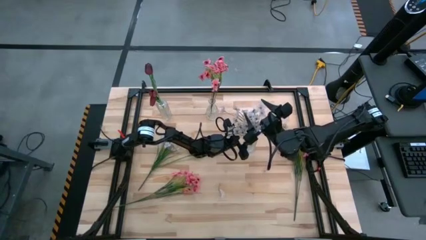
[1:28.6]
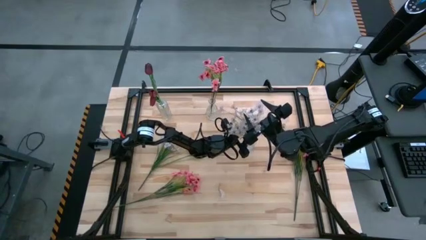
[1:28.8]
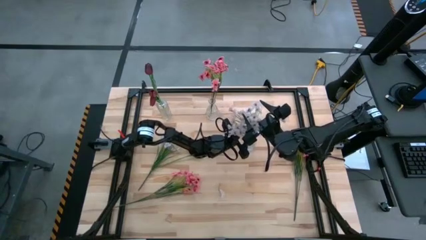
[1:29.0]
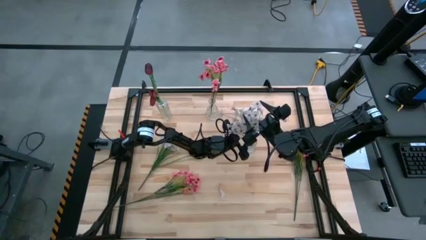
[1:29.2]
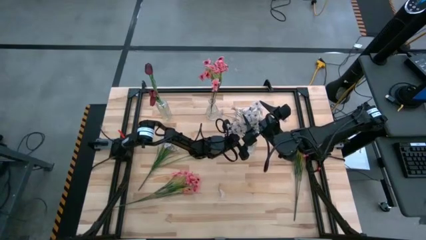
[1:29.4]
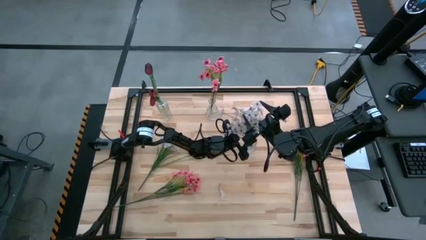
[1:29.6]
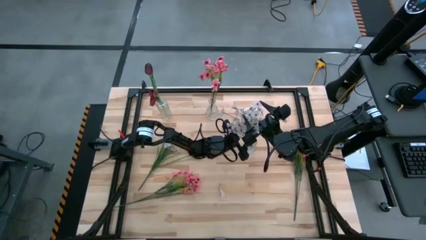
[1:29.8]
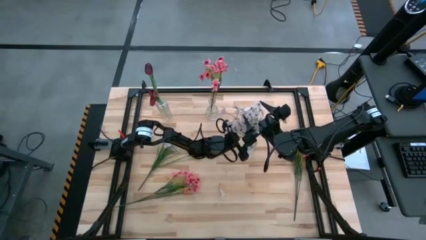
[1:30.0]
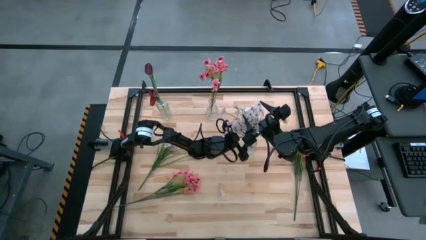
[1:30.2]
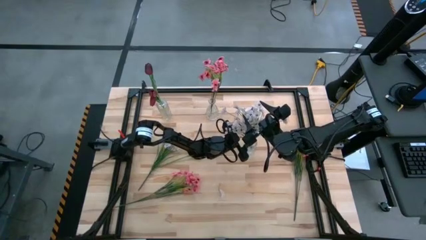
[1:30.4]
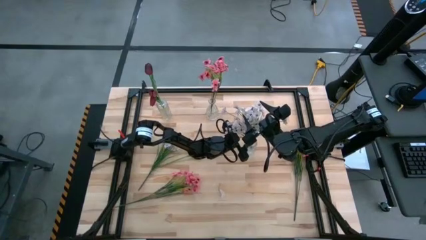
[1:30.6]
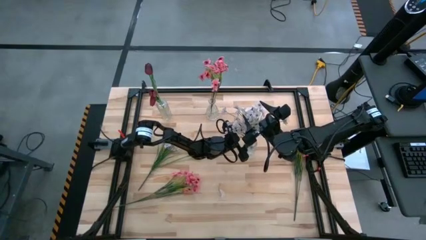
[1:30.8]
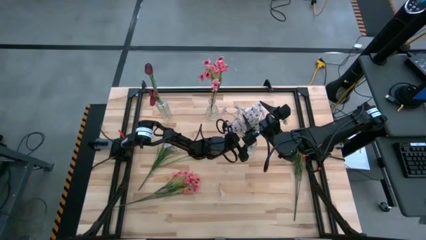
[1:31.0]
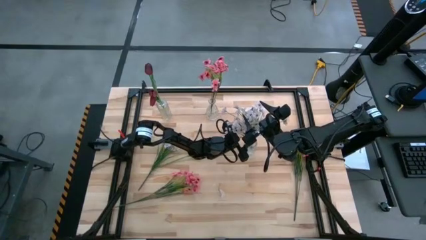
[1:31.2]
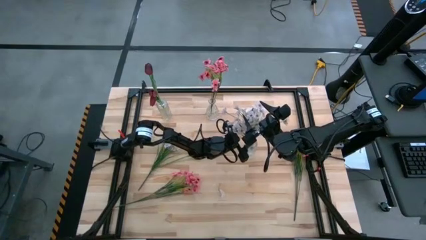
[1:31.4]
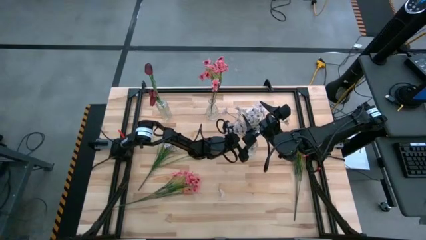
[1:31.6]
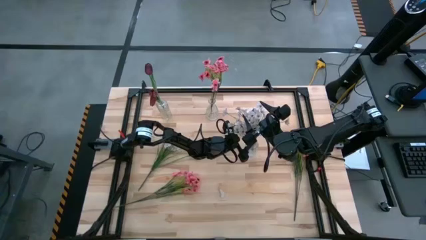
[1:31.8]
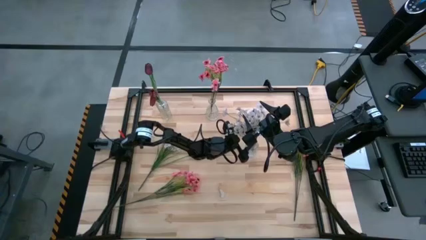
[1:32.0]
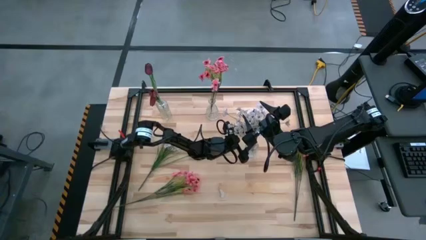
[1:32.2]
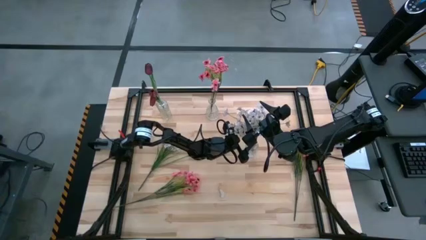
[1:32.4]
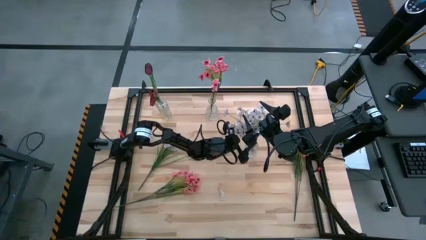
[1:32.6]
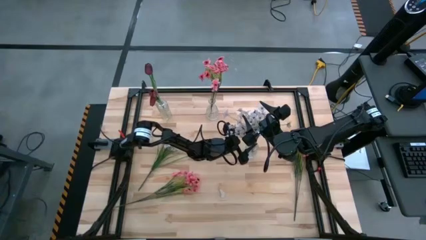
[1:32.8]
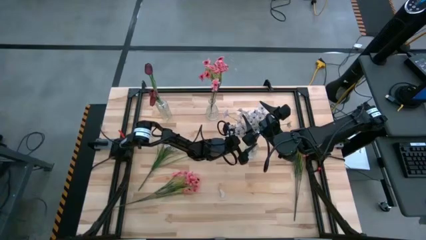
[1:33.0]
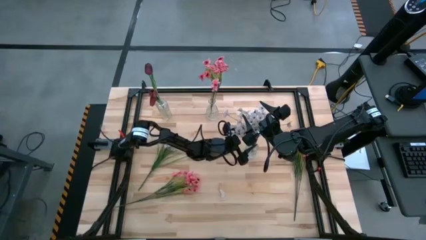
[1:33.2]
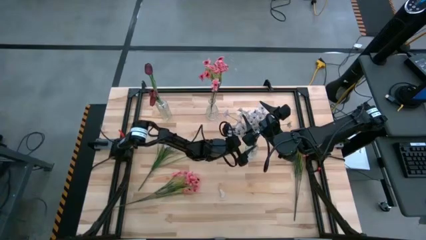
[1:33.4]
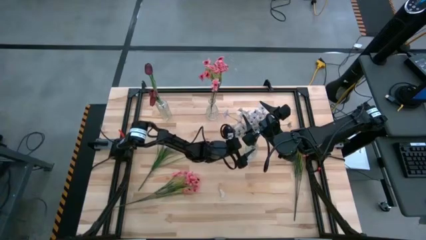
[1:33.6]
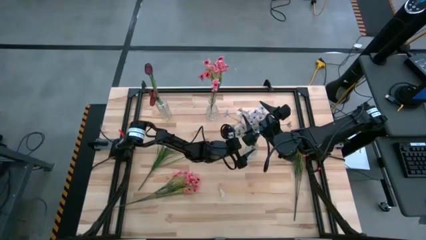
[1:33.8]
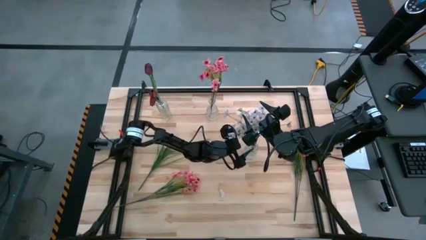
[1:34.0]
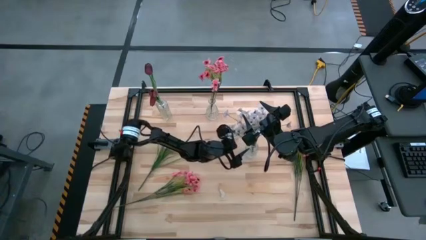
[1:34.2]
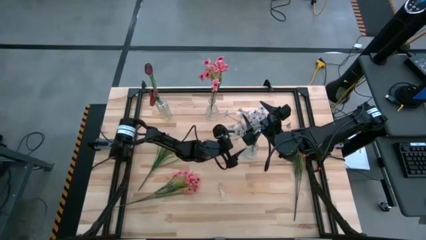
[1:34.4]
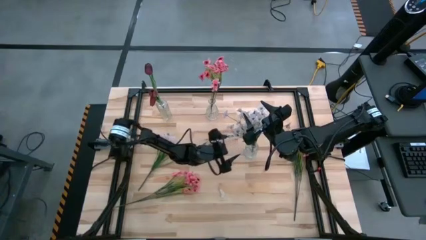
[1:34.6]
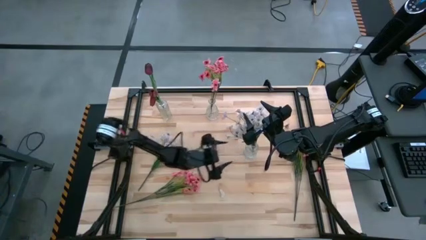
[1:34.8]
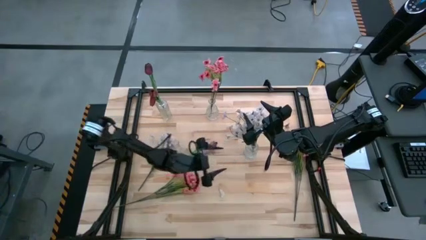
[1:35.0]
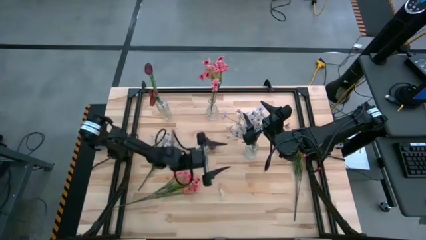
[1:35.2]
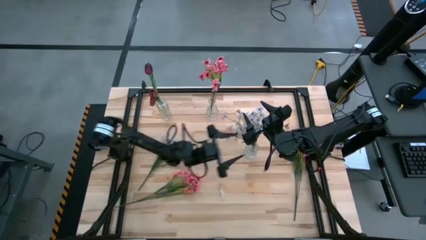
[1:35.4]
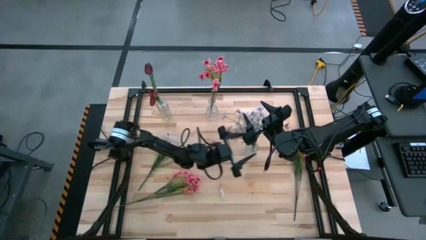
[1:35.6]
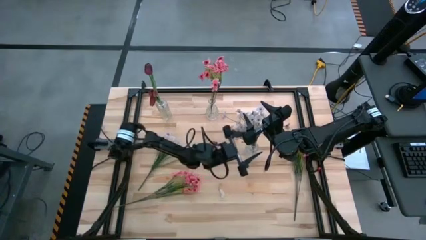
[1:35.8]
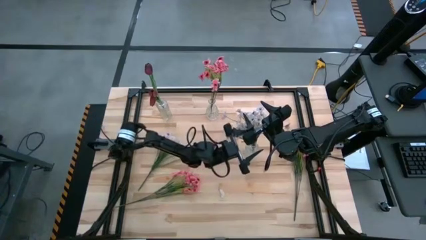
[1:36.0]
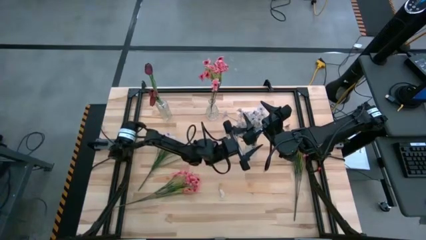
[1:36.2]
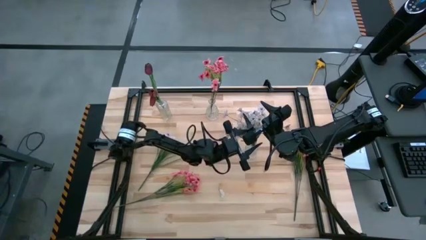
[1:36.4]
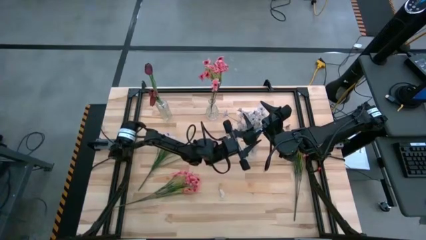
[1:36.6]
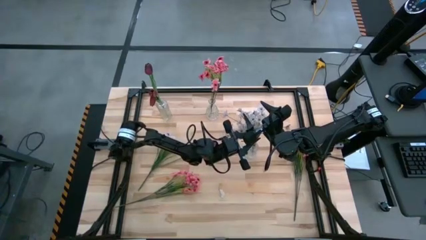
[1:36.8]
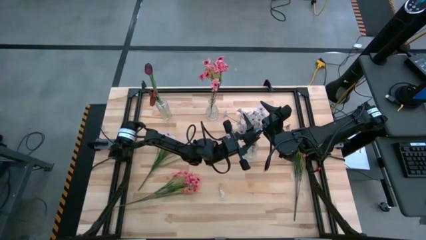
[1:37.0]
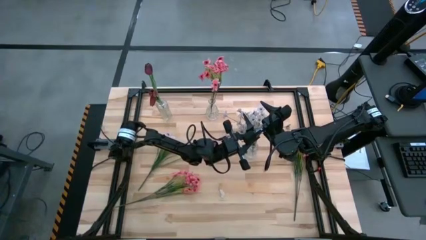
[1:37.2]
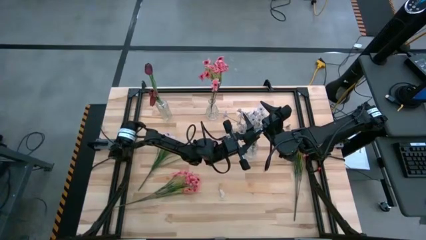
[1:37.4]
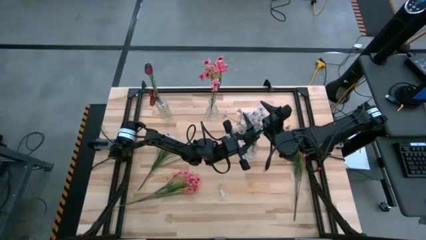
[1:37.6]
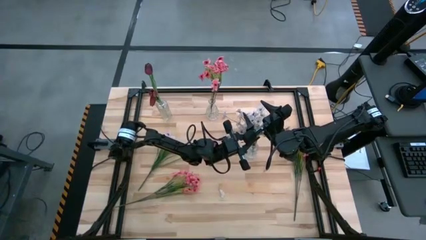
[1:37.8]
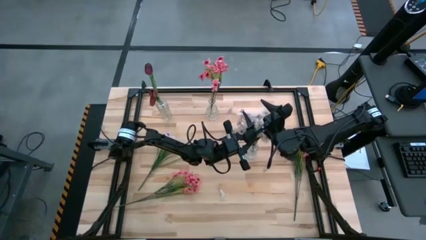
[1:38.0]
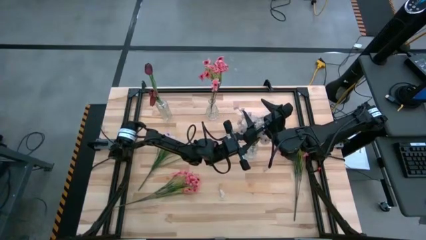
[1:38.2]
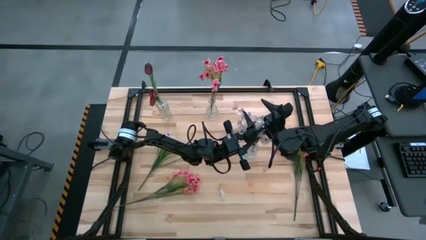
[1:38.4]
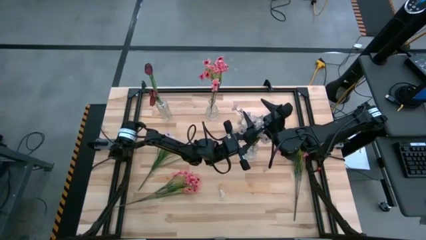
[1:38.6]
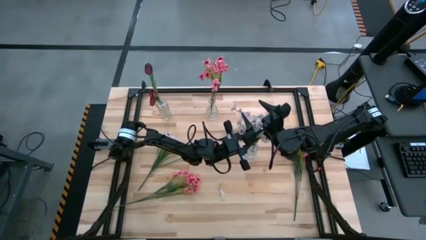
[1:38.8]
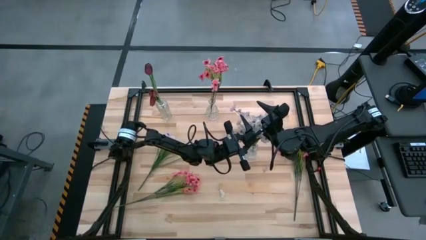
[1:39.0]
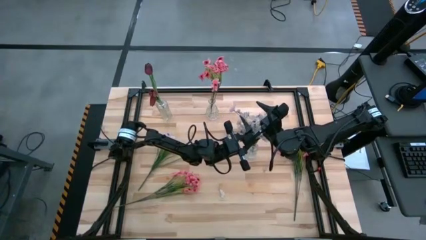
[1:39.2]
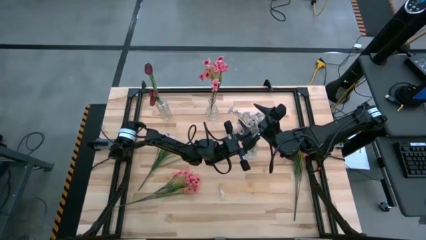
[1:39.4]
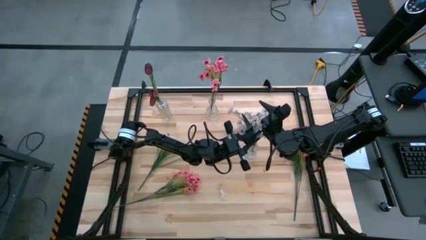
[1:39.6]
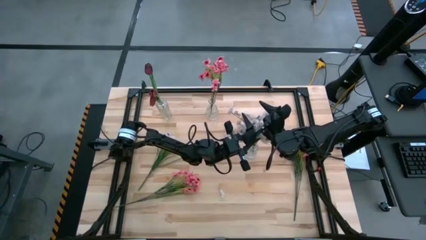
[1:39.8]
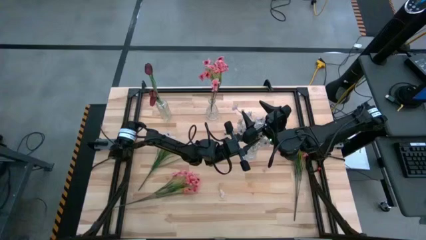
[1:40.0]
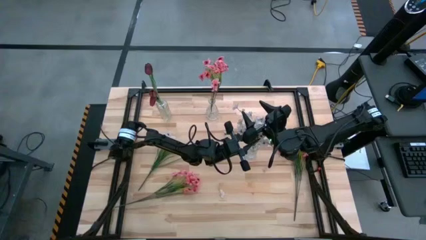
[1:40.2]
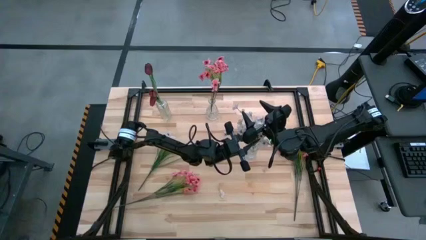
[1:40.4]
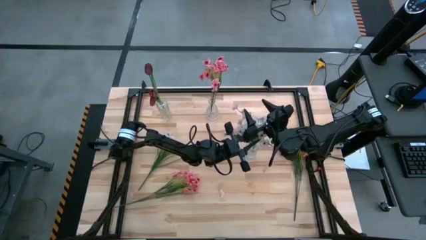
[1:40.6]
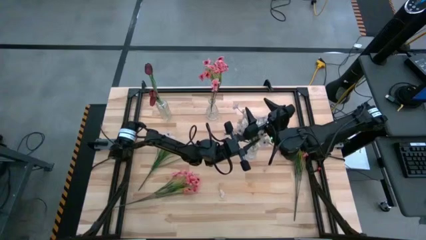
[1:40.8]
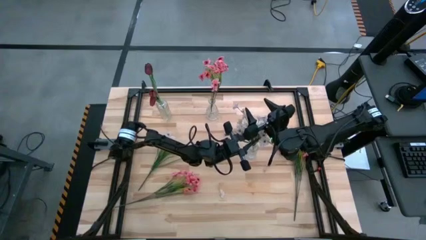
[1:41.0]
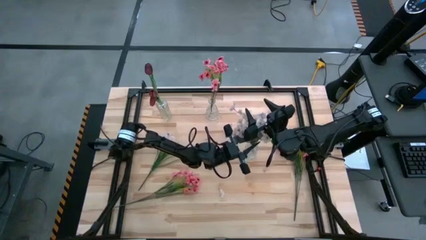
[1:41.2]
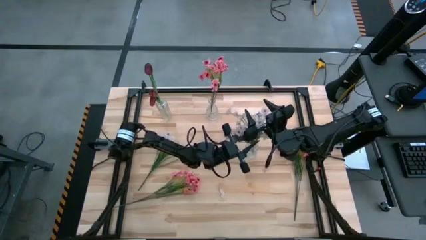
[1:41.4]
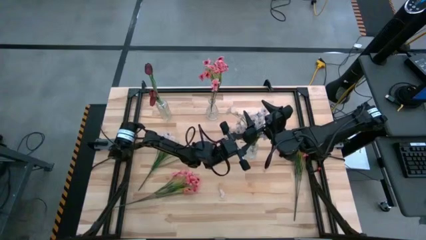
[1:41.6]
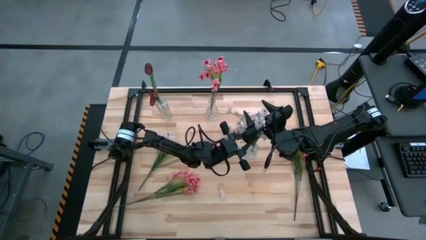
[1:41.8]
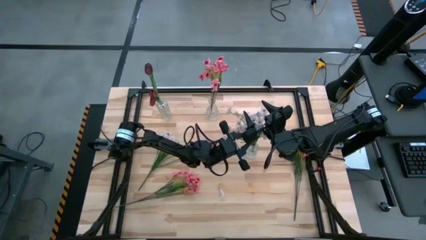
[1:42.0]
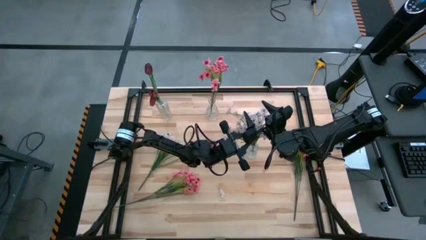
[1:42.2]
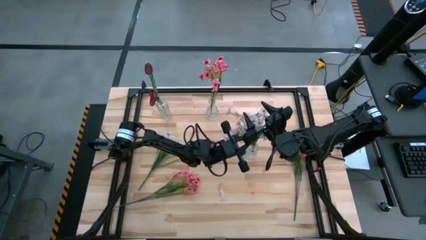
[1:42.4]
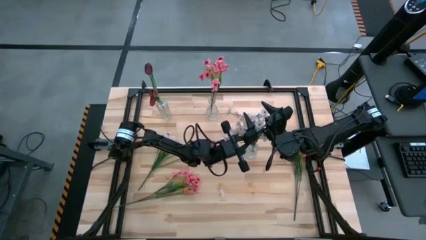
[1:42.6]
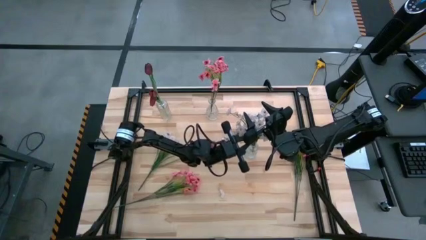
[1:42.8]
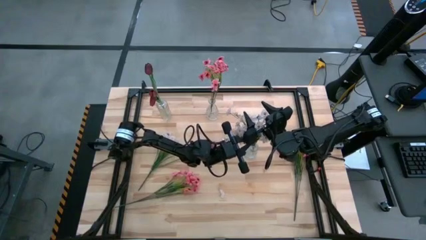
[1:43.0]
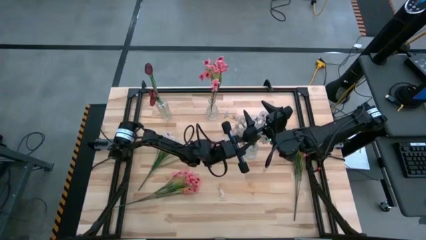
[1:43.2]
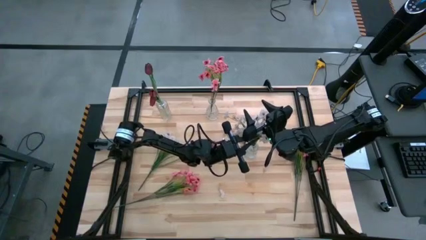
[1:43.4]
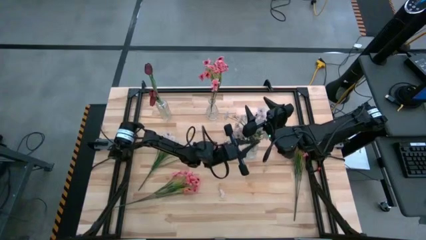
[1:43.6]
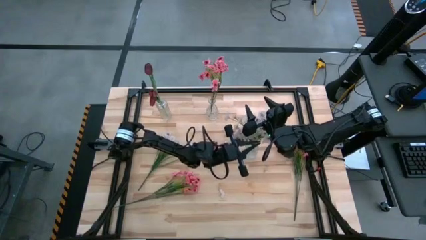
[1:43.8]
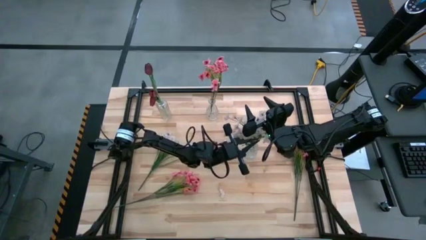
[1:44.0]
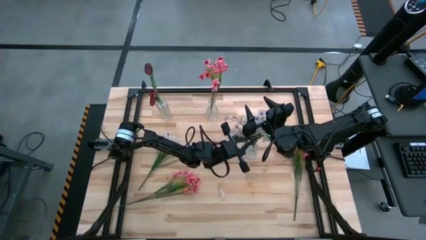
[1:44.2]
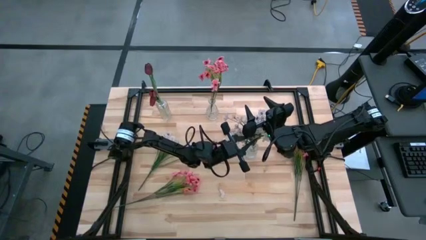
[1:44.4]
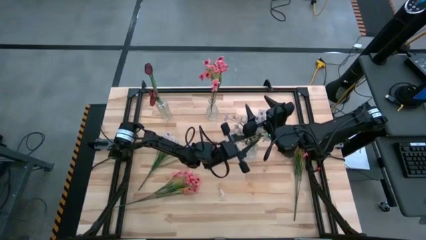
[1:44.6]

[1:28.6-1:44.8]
Task: Sort flowers into vase by color
Put the right white flowers into the right transparent vase
